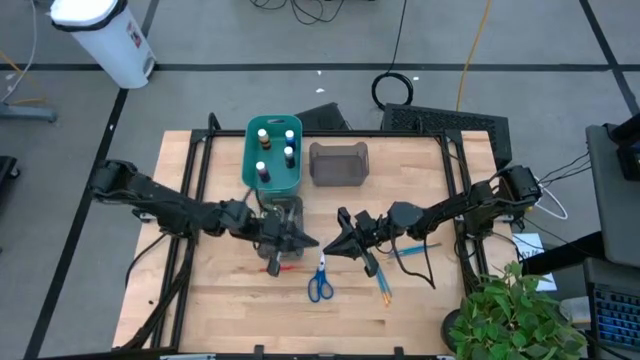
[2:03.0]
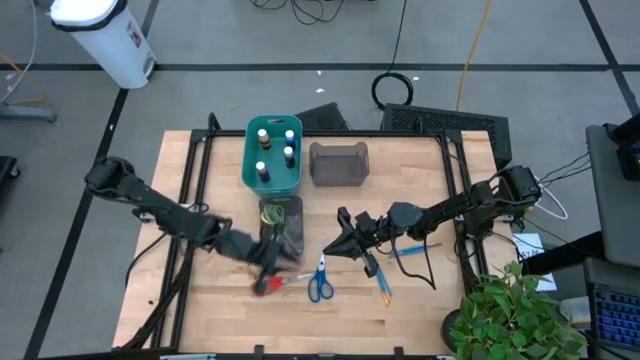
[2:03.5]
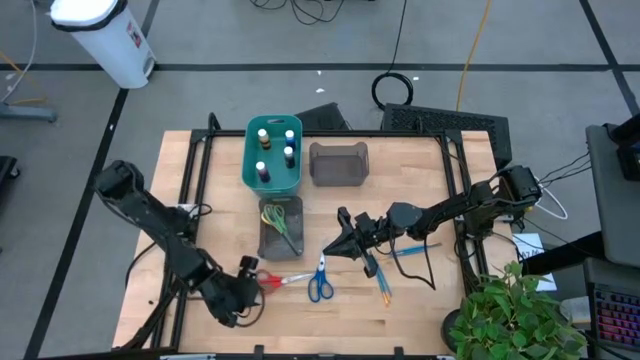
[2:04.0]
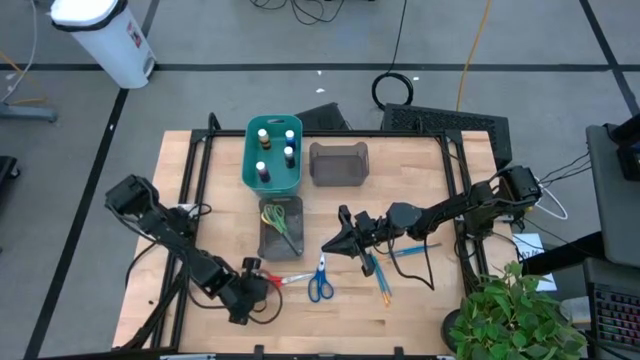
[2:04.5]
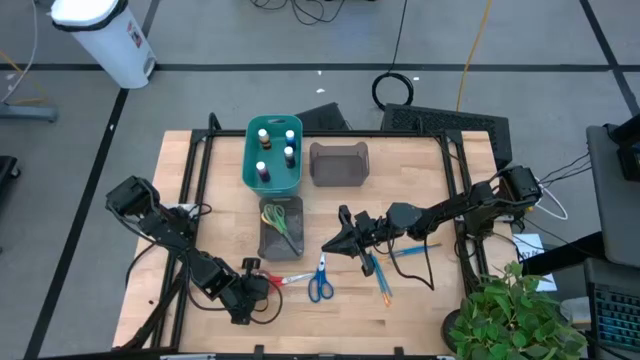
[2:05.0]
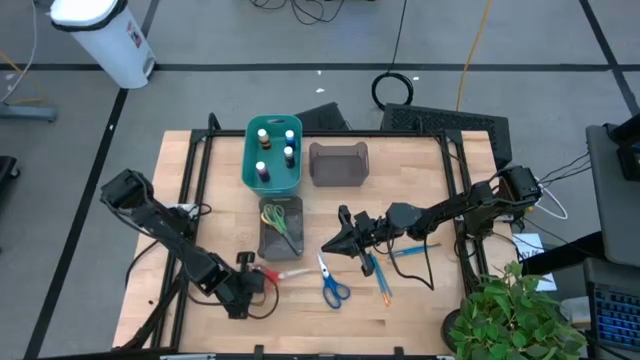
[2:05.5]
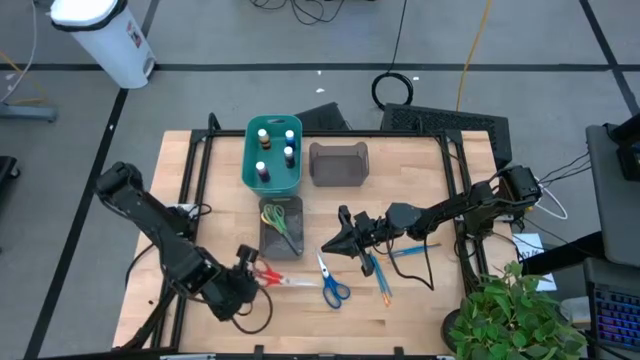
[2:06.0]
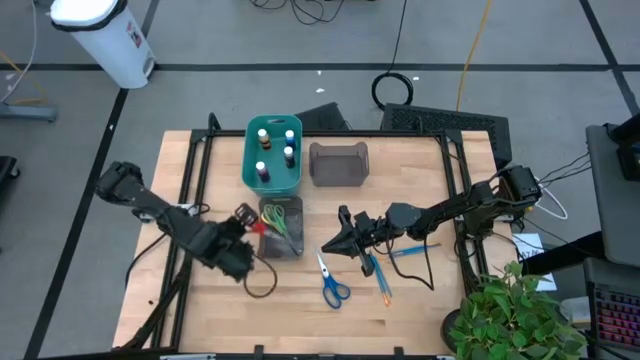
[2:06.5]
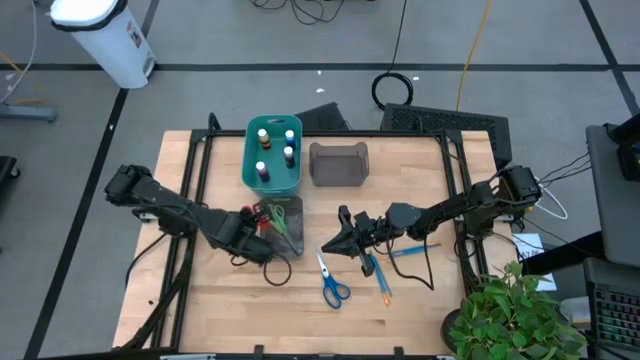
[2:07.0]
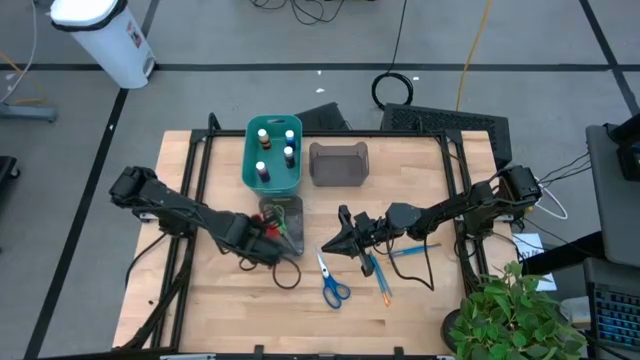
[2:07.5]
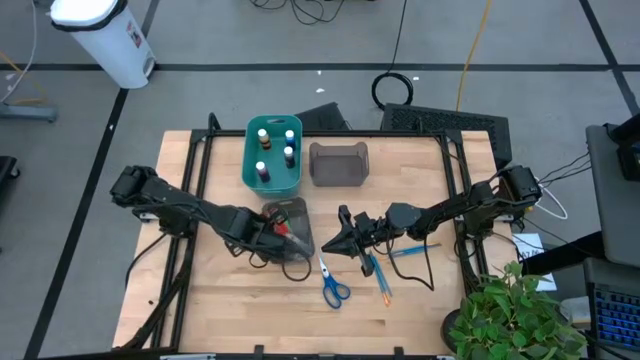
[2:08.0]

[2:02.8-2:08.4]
Task: Pick & Place Paint Supplies
Put the red scissors into the bottom black bin

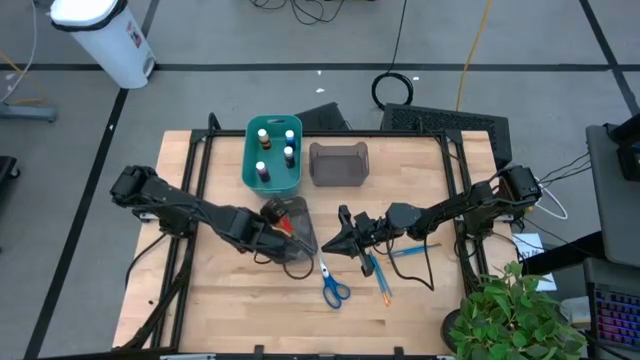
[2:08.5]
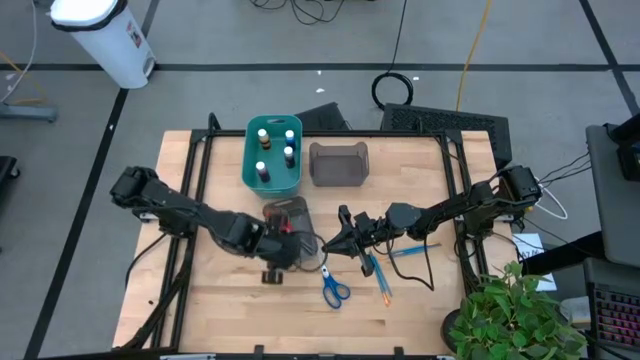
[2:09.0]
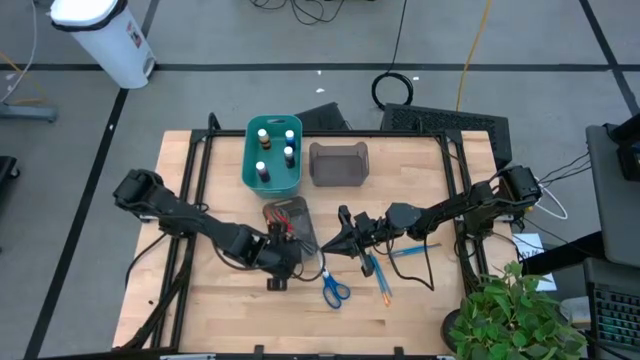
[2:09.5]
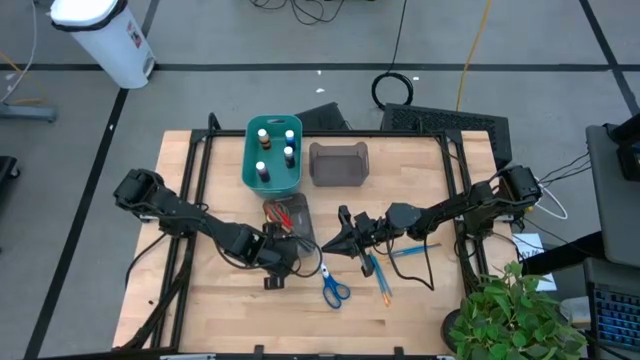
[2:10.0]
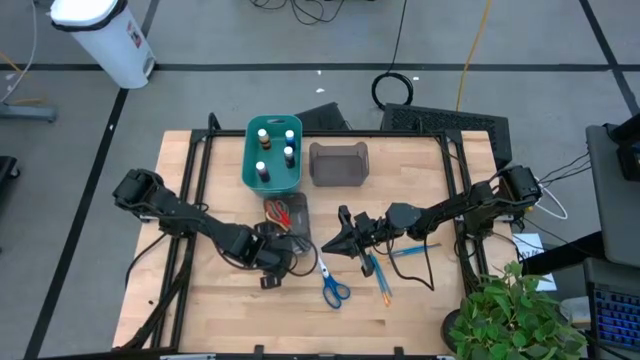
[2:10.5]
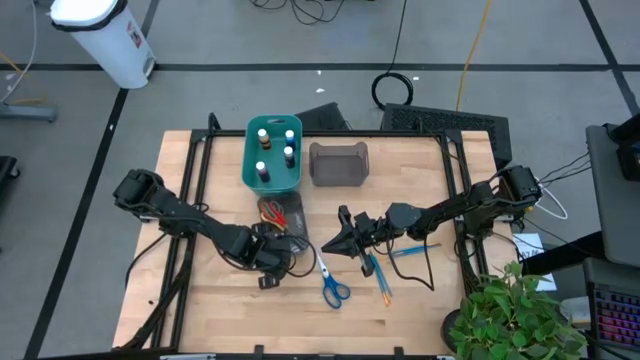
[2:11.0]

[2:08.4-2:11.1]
Adjust the bottom black bin

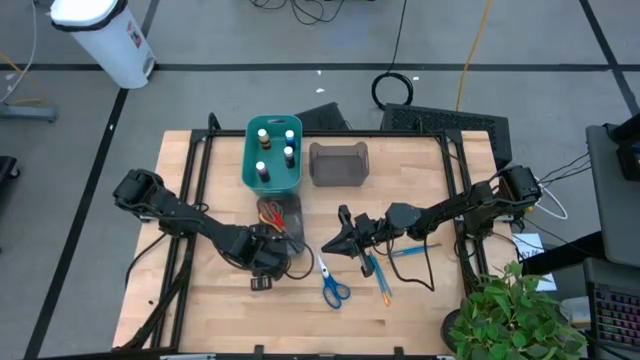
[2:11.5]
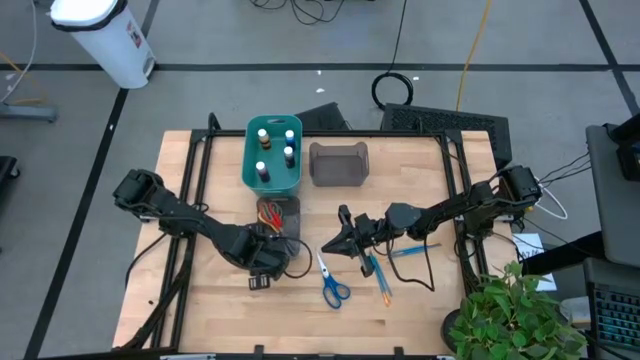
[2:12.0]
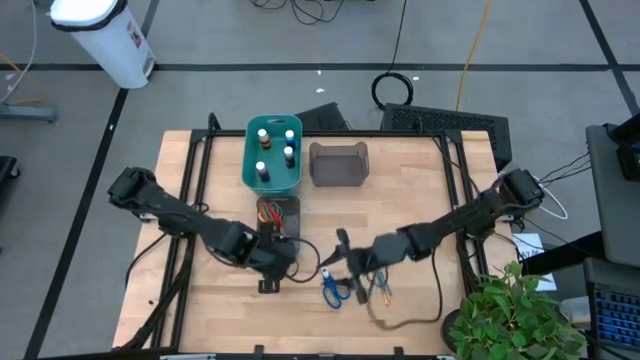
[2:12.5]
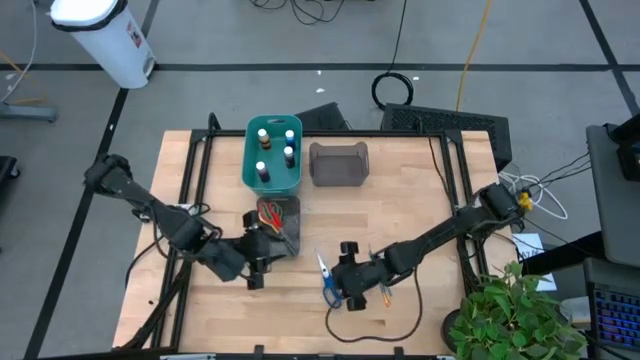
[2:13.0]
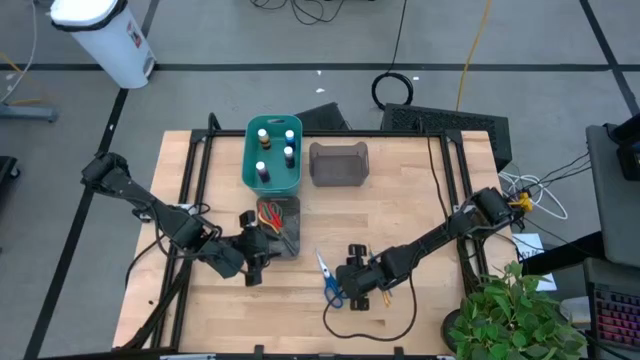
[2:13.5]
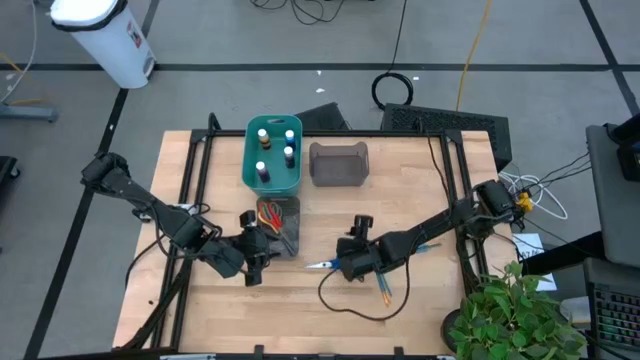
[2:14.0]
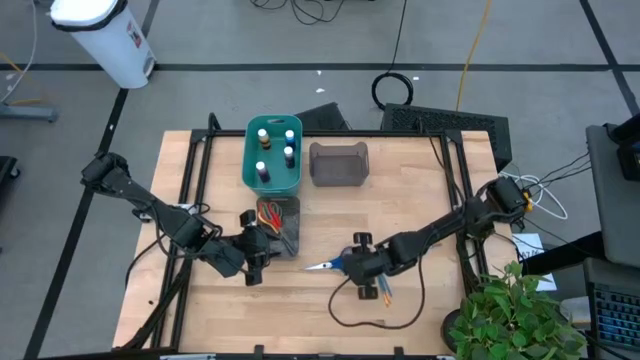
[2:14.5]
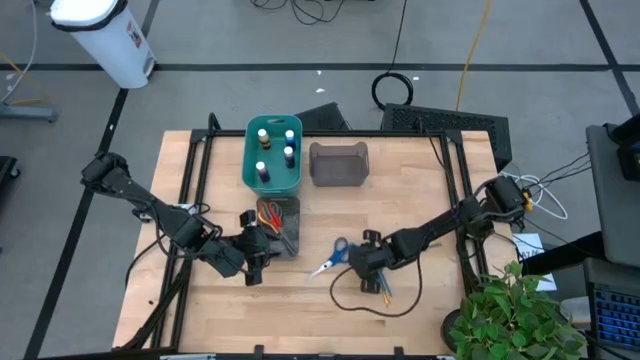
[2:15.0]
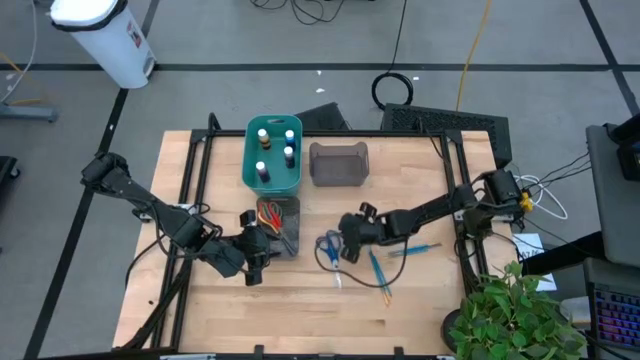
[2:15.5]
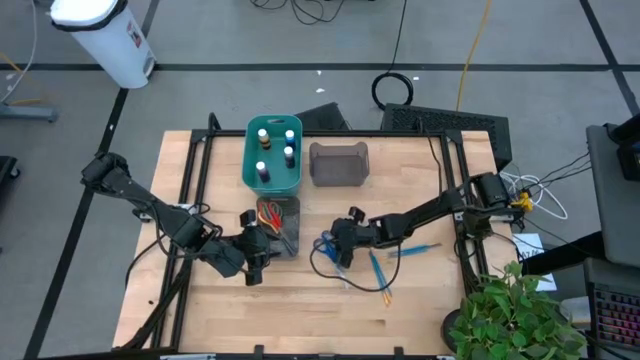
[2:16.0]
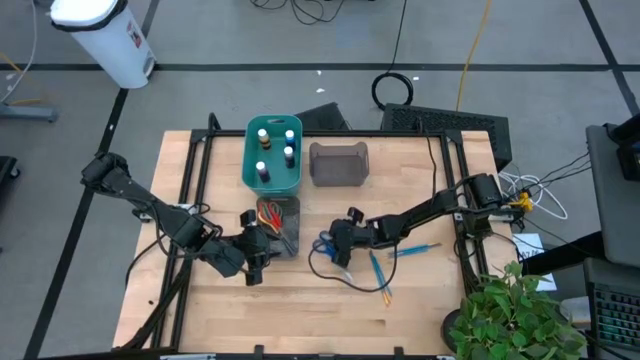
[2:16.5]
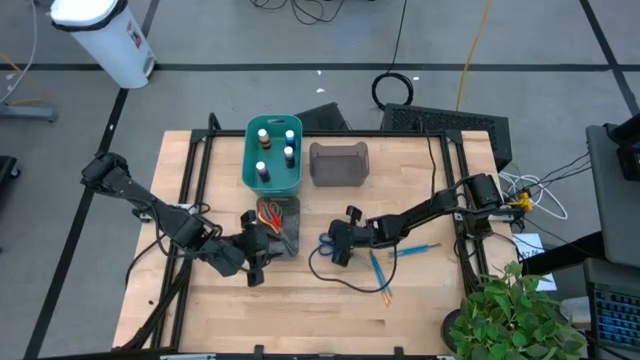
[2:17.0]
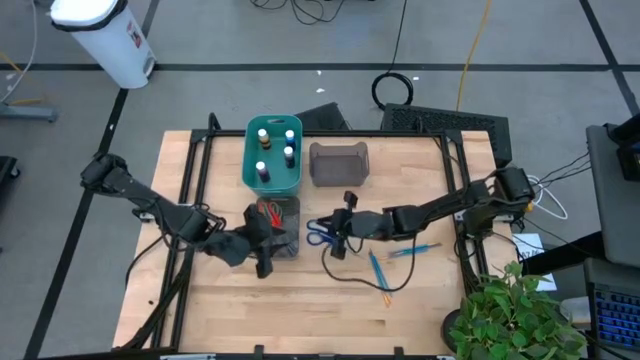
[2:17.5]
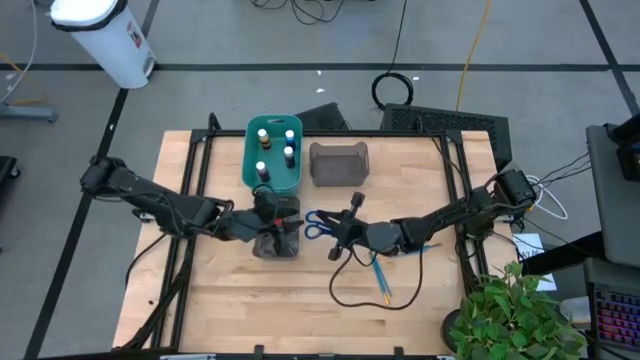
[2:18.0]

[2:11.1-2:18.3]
Put the blue scissors into the bottom black bin
